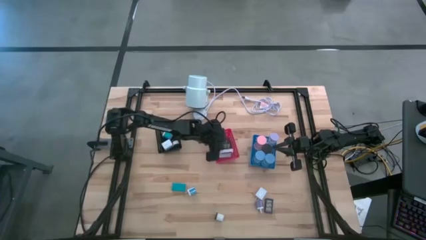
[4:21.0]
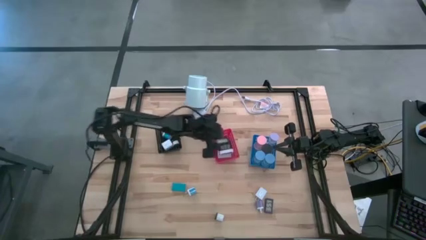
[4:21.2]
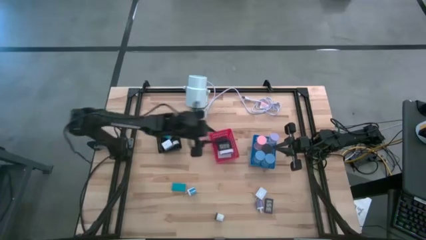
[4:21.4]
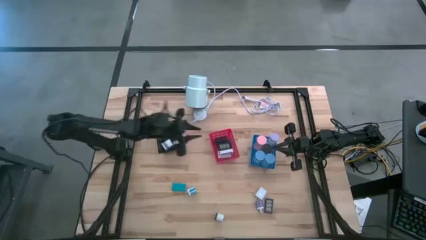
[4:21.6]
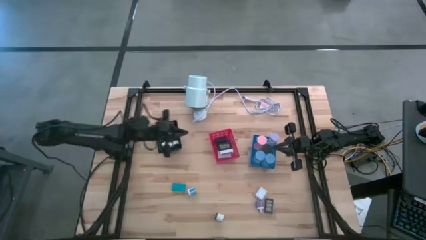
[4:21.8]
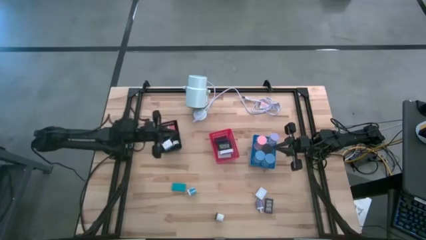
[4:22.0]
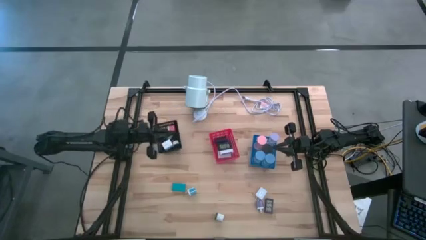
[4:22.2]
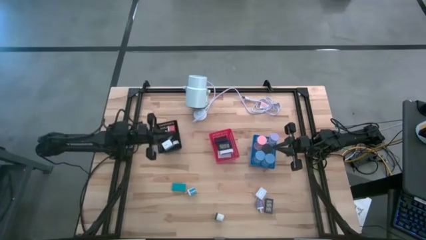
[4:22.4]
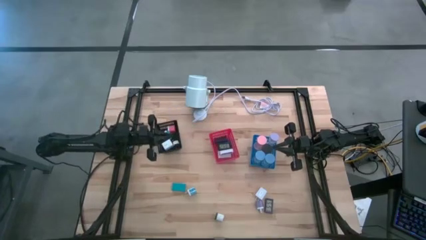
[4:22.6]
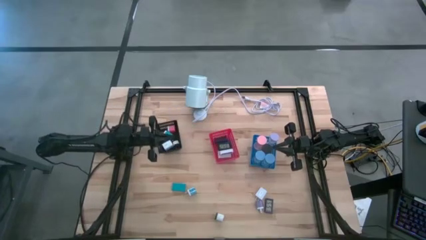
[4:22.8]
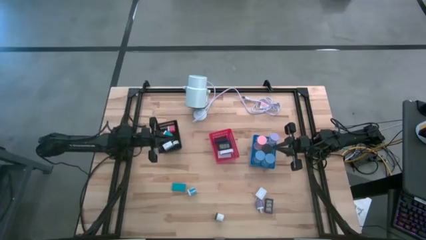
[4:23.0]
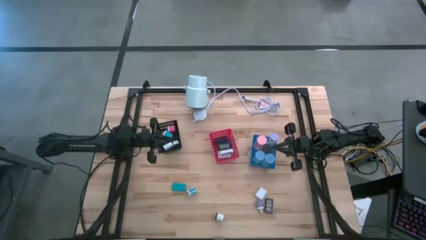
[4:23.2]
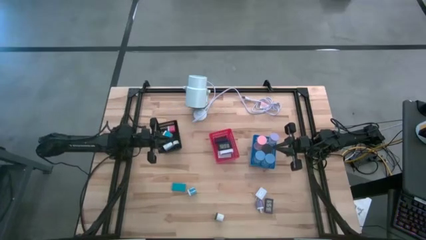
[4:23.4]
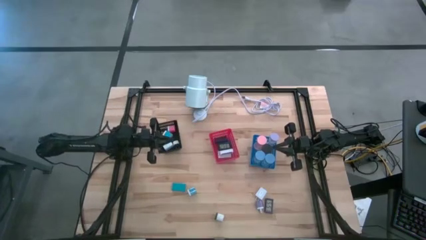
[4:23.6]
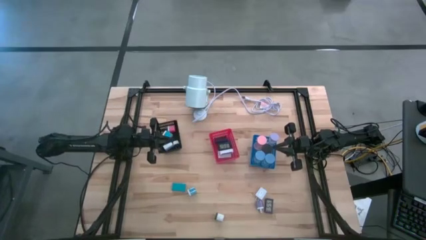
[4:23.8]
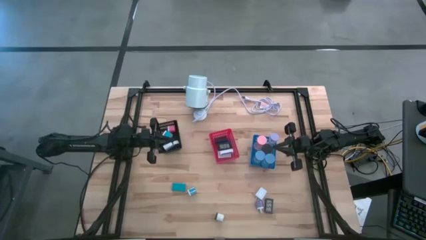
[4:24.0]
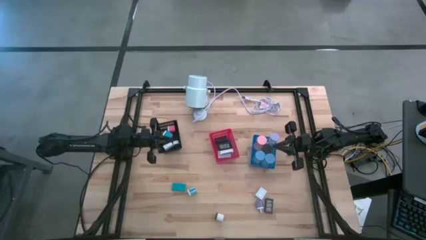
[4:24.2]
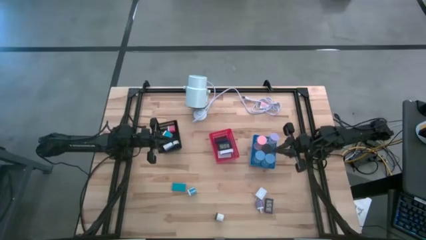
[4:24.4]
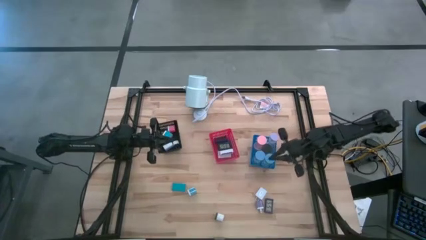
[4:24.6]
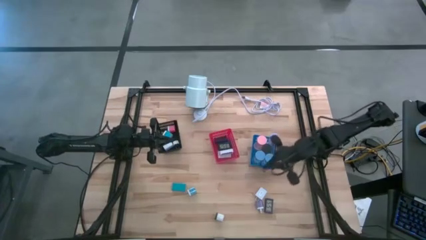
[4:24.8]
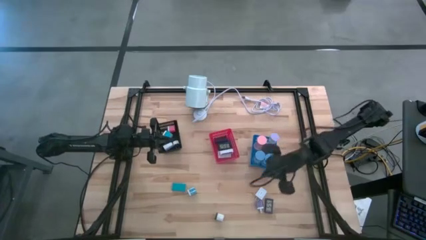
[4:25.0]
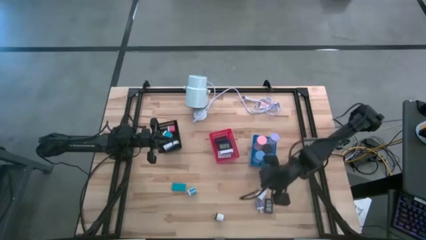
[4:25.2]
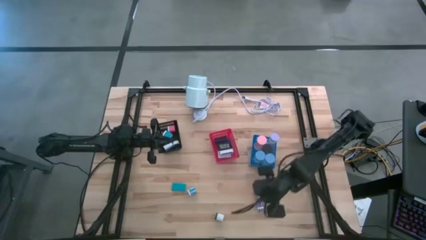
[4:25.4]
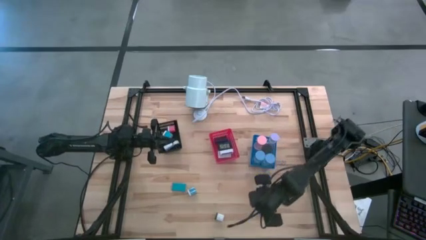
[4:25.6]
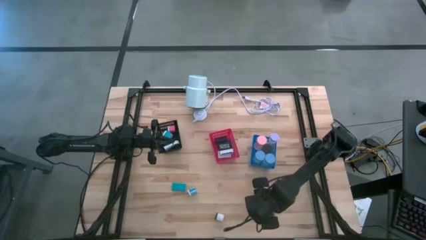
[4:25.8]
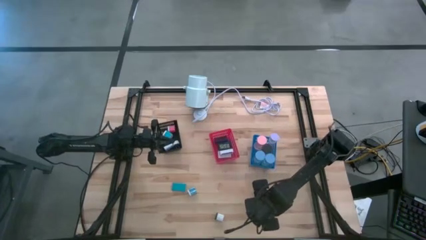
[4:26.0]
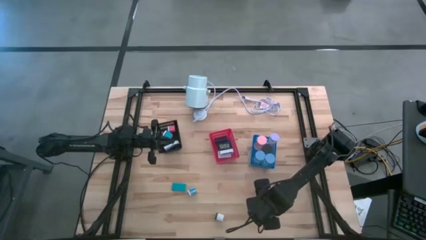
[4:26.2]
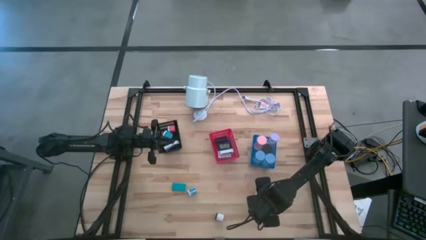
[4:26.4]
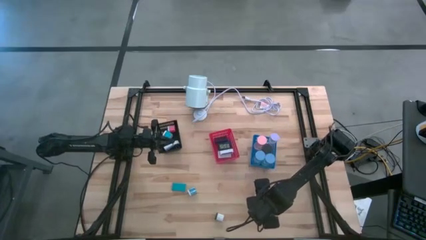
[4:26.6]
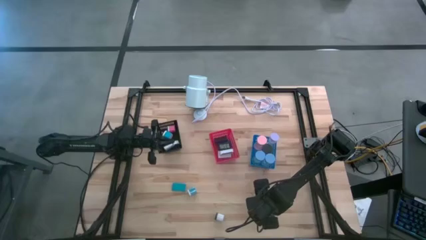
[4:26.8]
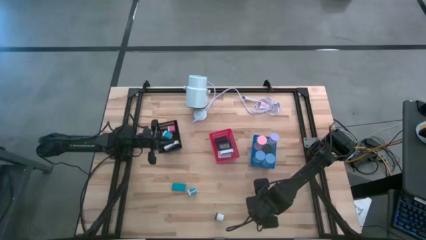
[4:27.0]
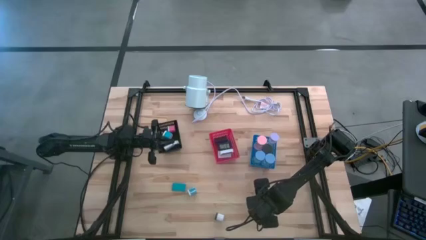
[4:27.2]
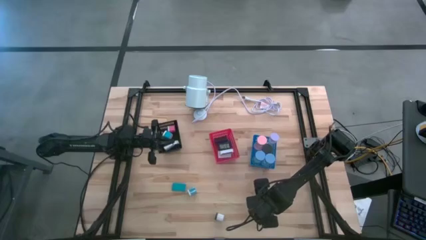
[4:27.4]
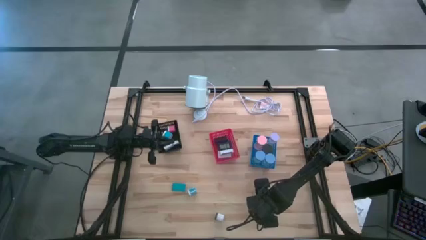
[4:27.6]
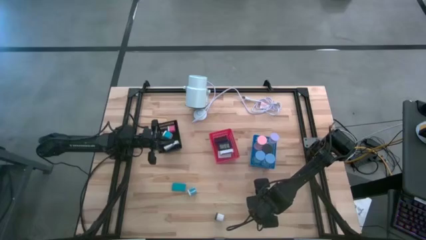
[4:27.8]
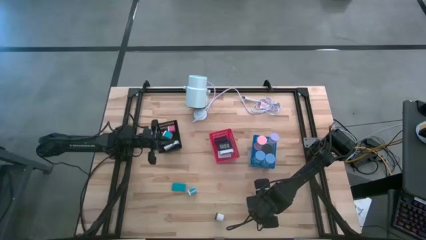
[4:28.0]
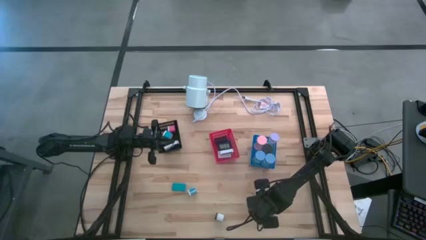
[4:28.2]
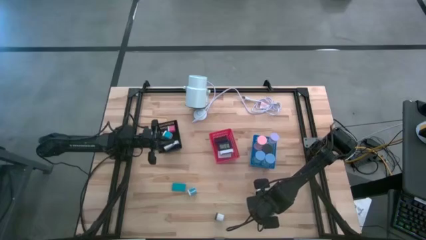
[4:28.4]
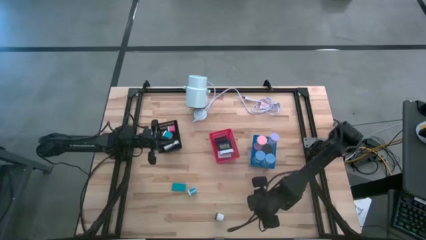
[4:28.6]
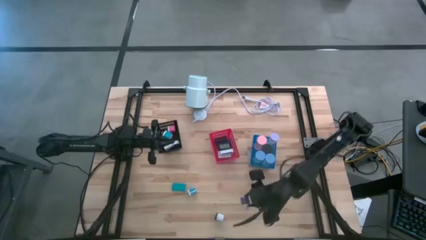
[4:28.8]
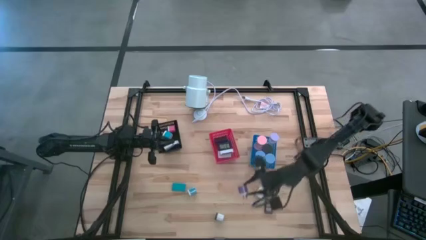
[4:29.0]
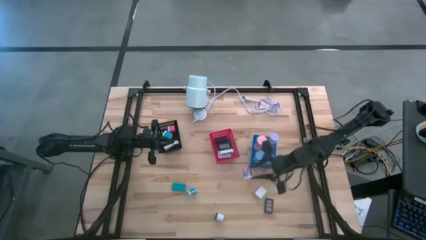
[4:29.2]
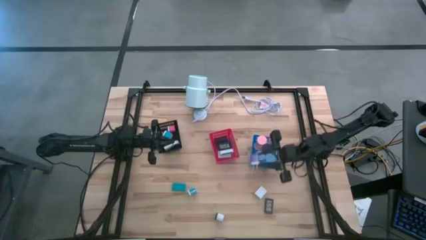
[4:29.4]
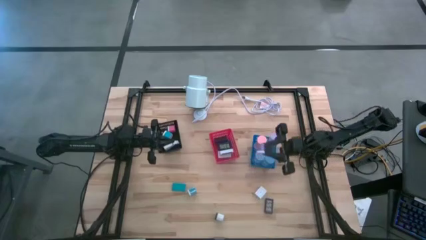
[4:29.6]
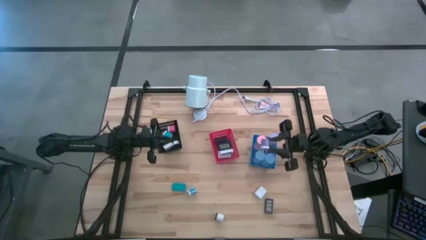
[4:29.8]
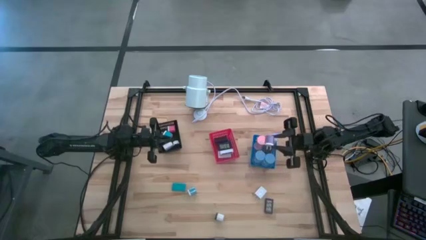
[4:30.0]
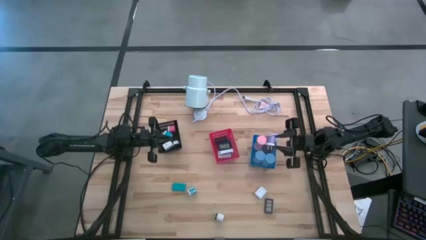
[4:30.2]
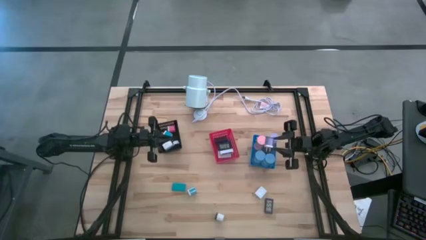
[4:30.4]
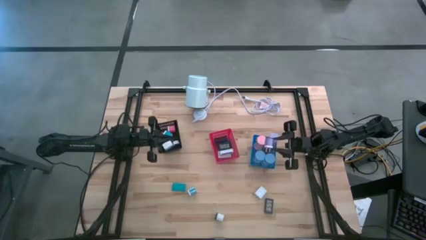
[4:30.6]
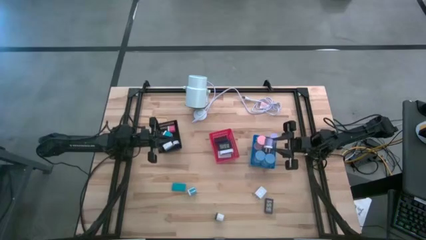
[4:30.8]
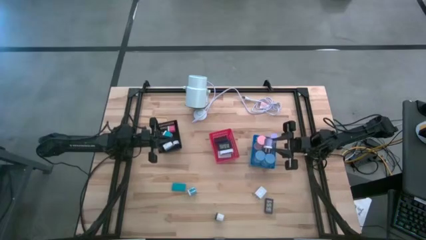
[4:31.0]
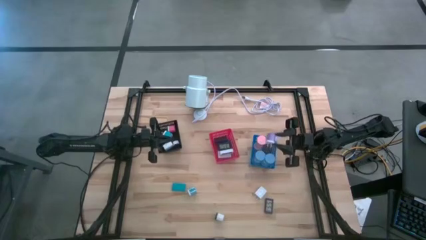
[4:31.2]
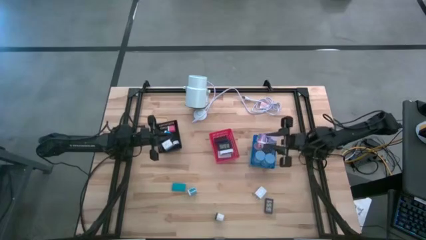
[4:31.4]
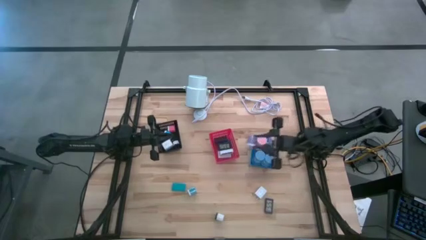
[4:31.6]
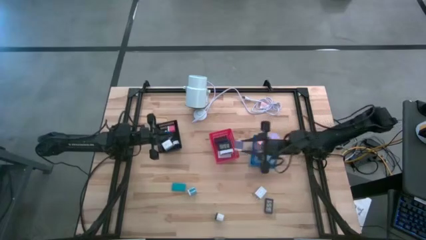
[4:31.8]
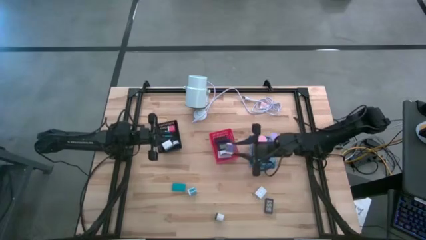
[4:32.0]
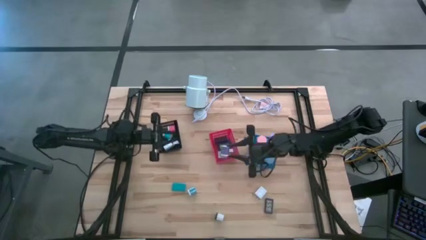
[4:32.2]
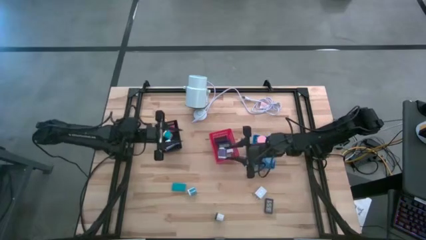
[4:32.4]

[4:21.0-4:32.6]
Task: Pick & Place Office items
Put the purple charger adapter into the black bin

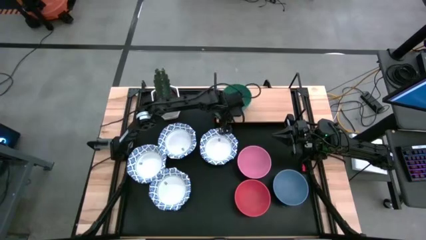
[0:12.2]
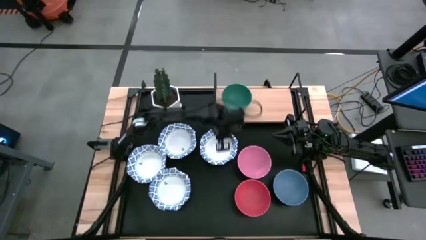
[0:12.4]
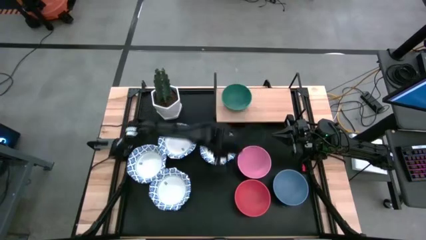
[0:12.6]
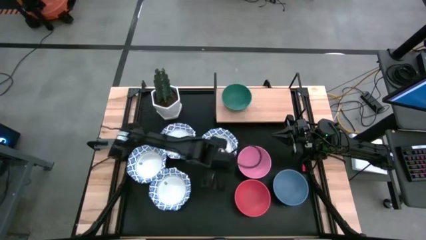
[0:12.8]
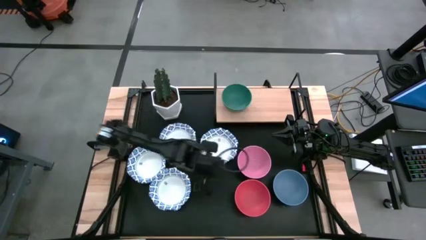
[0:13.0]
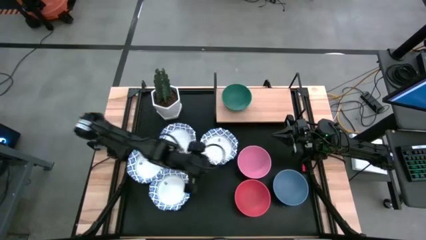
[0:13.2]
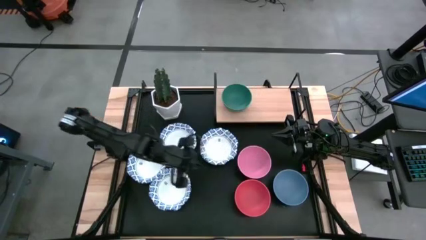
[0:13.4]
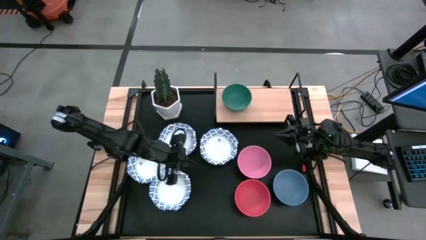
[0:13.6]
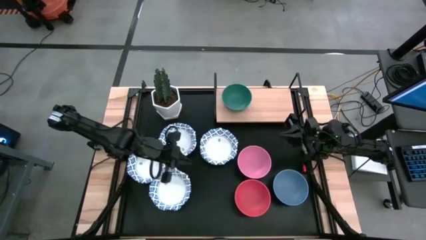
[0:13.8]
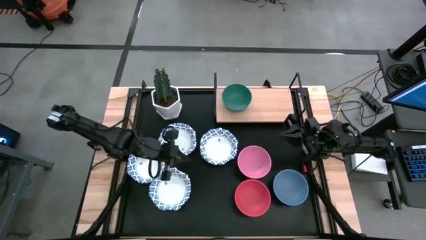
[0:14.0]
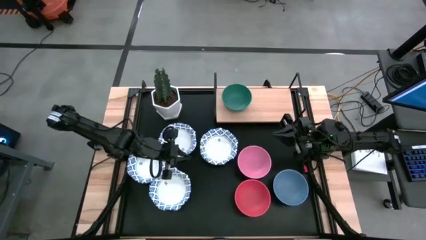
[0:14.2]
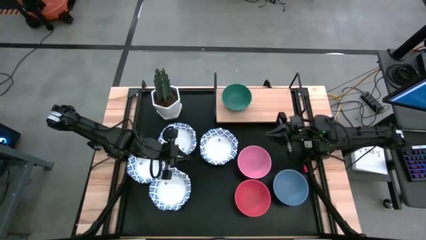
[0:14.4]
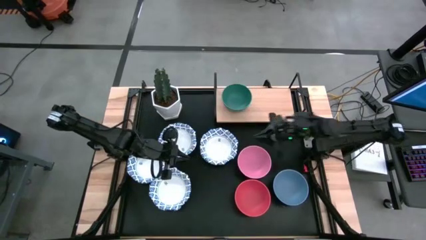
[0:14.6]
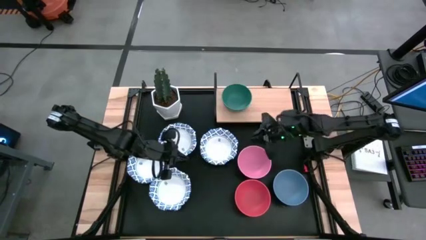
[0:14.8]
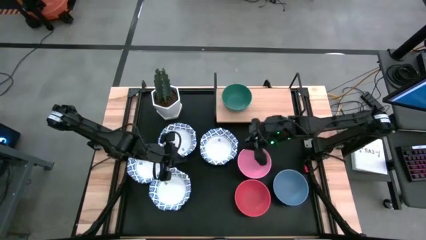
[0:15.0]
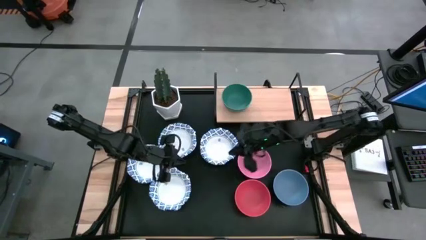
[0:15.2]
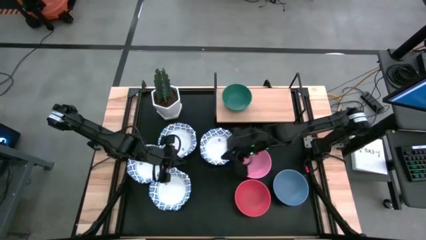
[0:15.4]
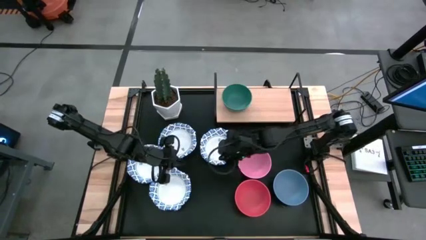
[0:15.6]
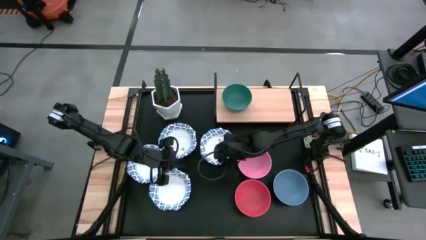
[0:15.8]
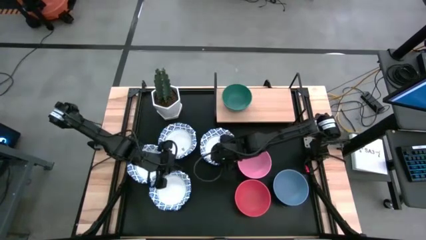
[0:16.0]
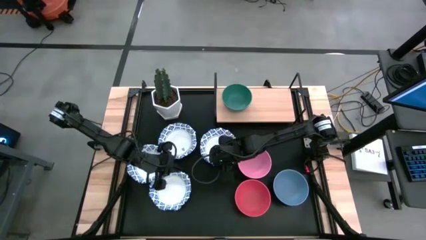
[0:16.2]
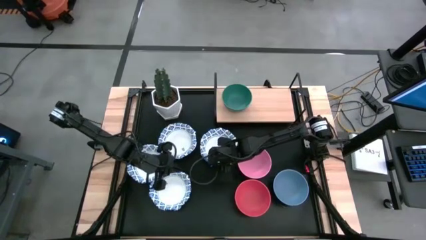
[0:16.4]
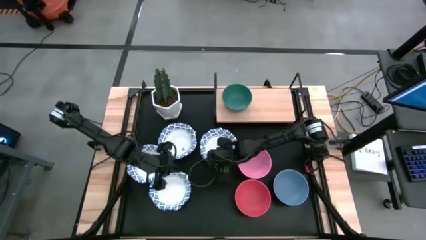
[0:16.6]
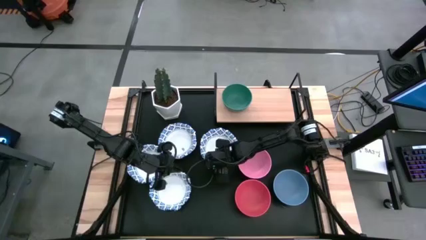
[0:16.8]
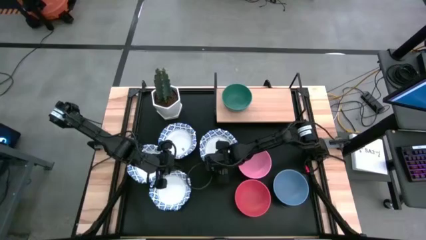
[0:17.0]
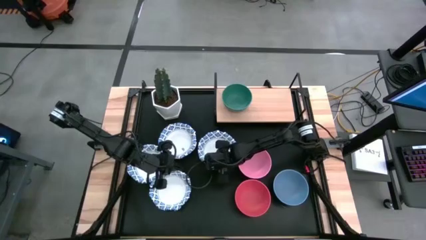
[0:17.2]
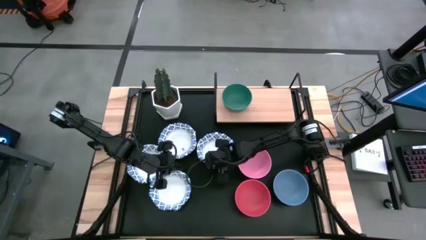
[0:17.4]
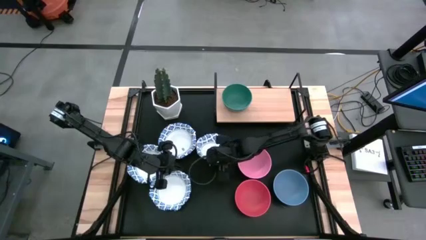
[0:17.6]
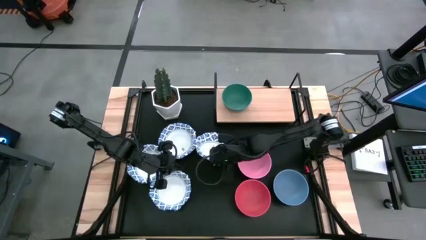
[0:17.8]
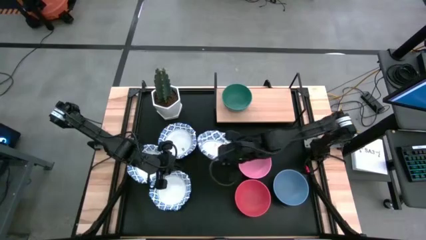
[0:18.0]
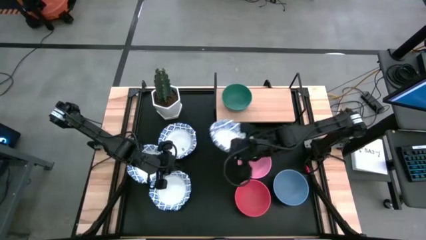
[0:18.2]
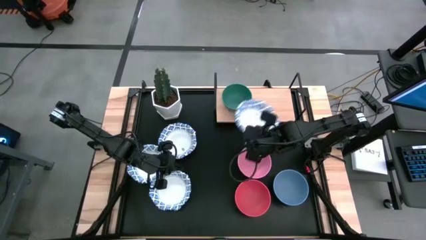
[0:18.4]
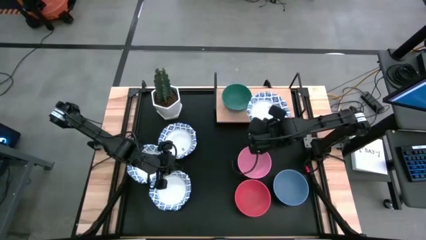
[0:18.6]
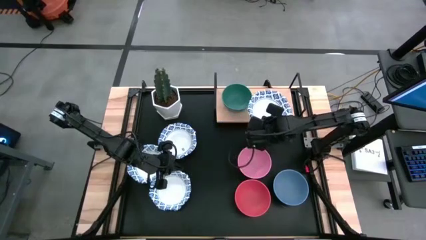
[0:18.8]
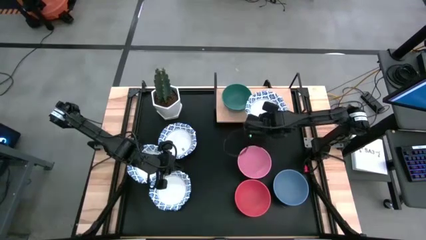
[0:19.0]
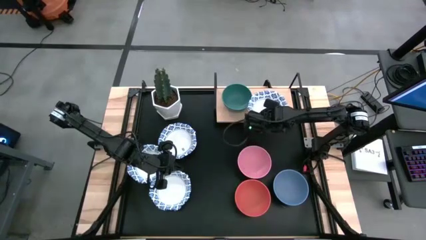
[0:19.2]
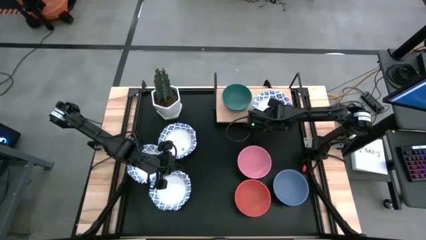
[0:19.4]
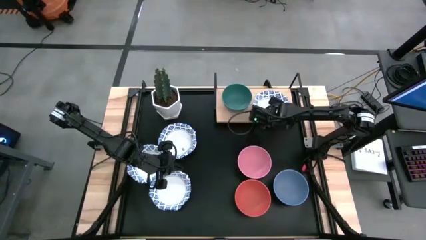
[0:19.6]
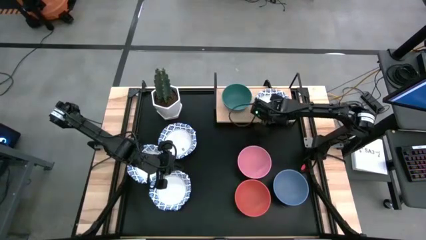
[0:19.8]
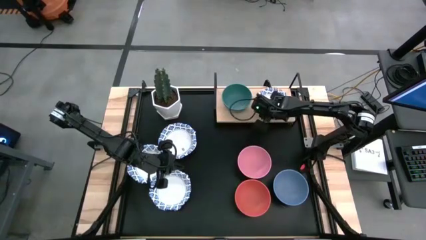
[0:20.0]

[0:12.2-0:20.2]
Task: Place and stack bowls onto a shelf
Put the blue patterned bowl on the shelf
